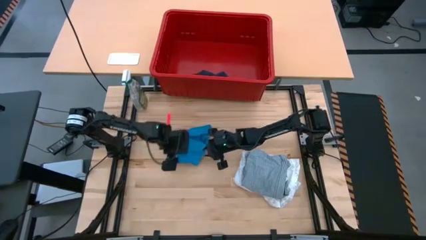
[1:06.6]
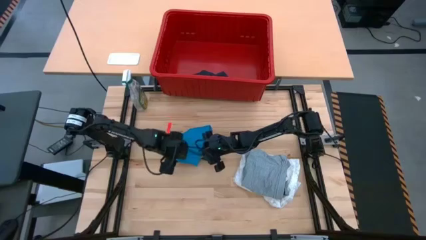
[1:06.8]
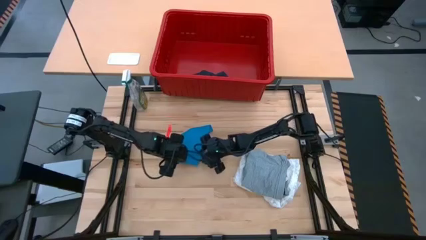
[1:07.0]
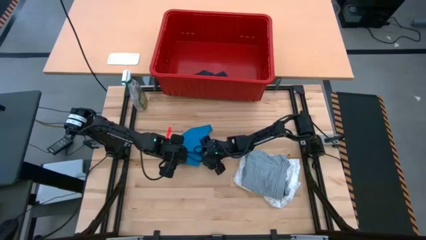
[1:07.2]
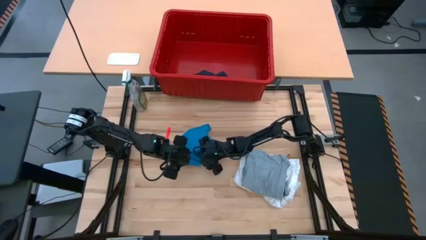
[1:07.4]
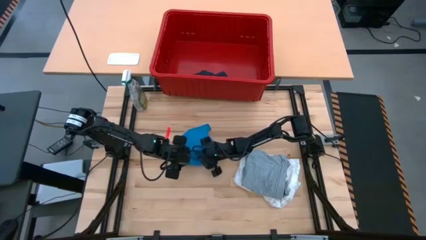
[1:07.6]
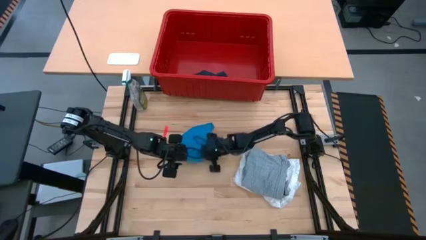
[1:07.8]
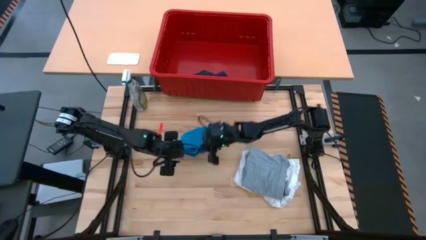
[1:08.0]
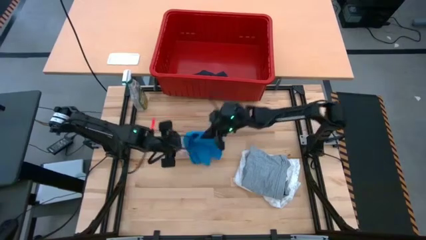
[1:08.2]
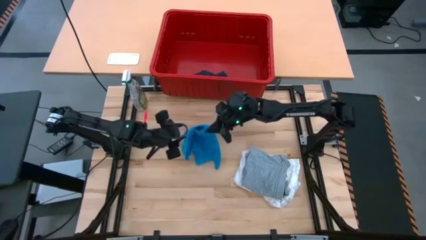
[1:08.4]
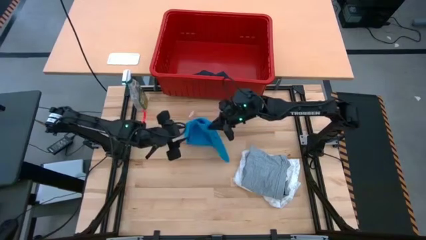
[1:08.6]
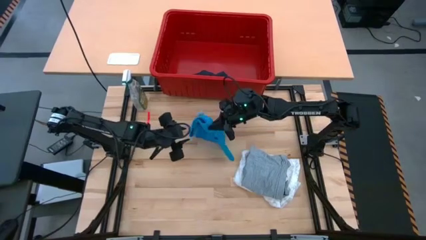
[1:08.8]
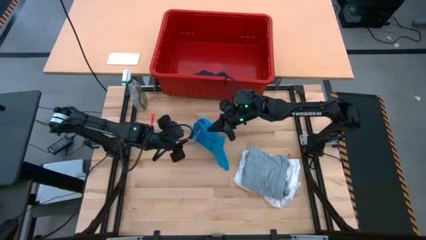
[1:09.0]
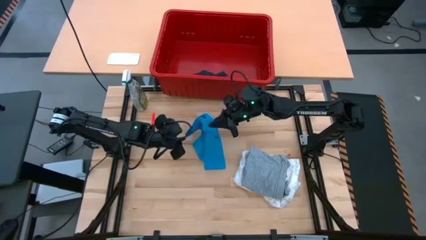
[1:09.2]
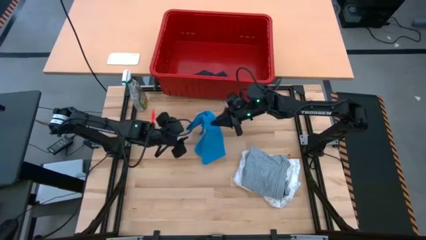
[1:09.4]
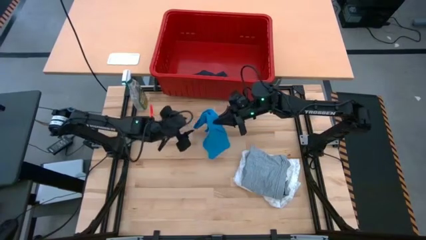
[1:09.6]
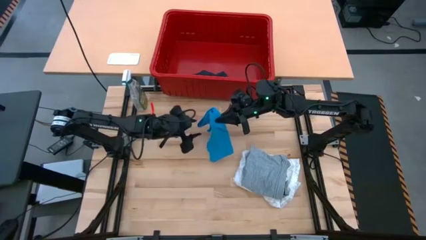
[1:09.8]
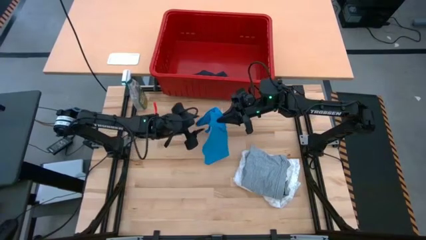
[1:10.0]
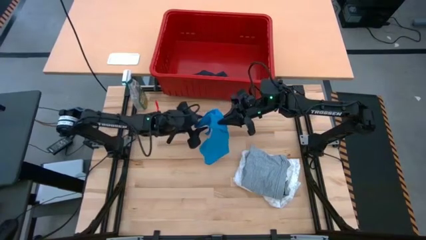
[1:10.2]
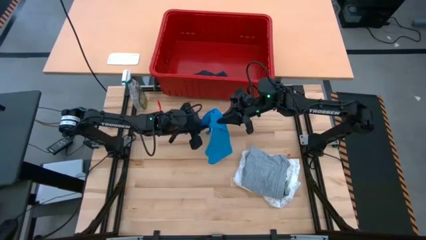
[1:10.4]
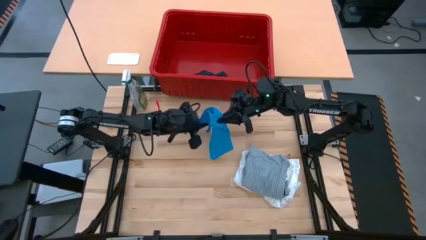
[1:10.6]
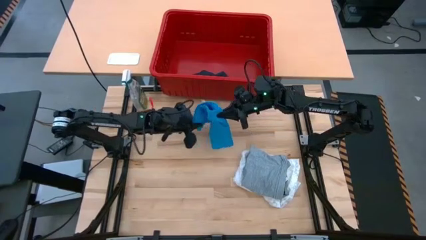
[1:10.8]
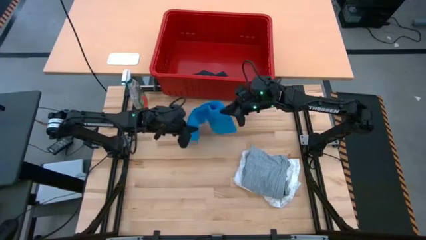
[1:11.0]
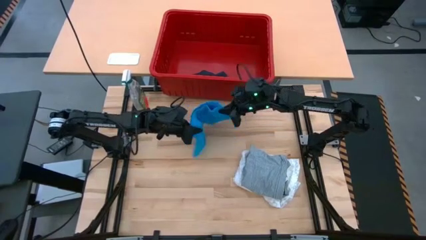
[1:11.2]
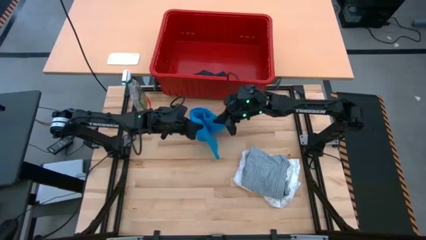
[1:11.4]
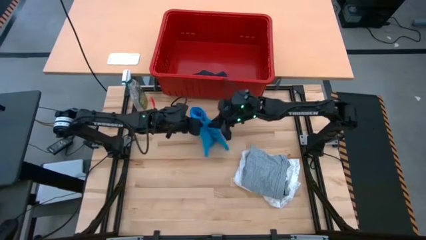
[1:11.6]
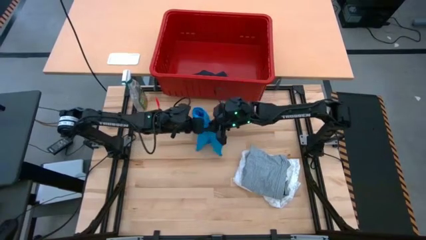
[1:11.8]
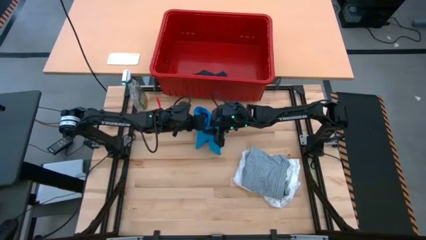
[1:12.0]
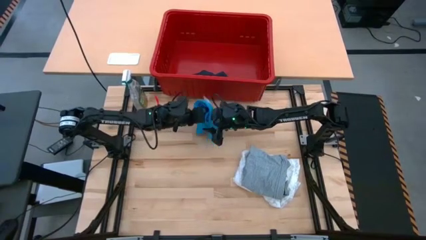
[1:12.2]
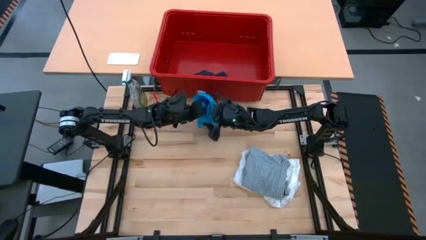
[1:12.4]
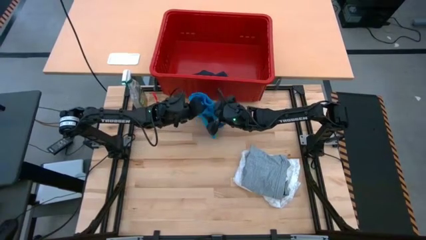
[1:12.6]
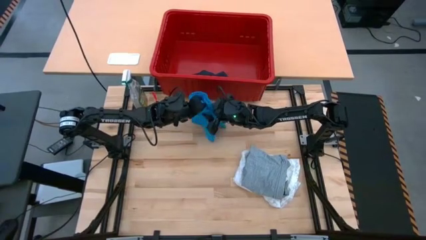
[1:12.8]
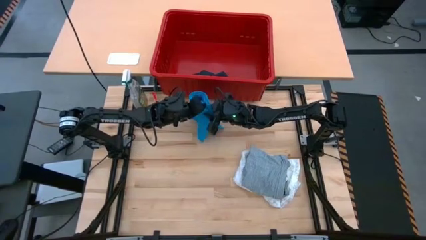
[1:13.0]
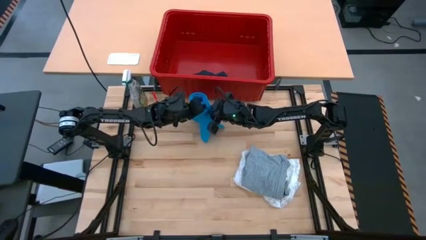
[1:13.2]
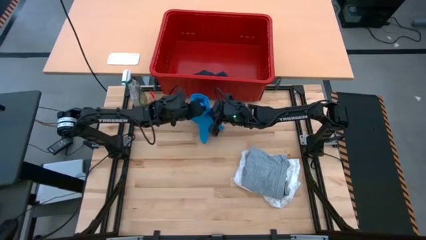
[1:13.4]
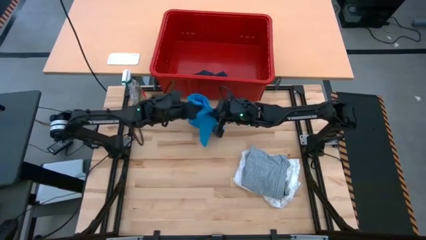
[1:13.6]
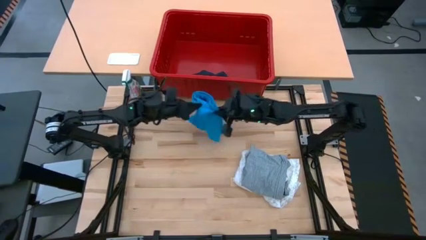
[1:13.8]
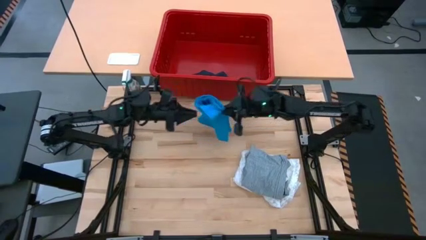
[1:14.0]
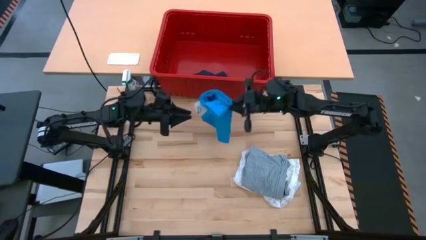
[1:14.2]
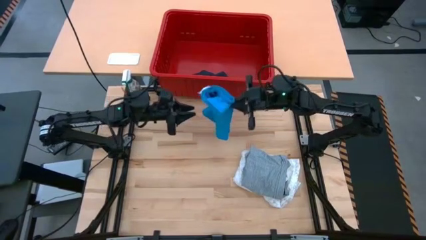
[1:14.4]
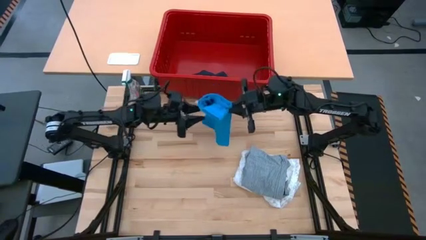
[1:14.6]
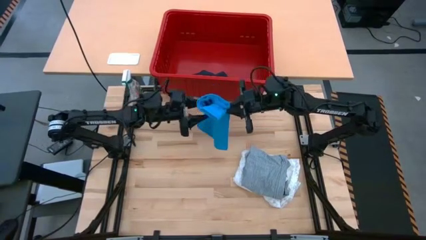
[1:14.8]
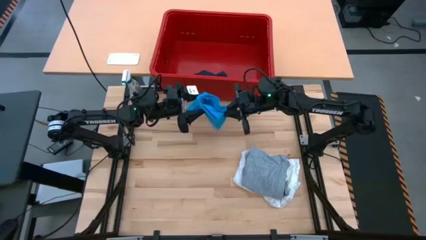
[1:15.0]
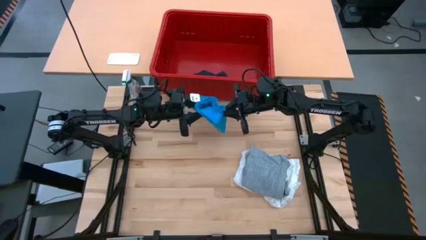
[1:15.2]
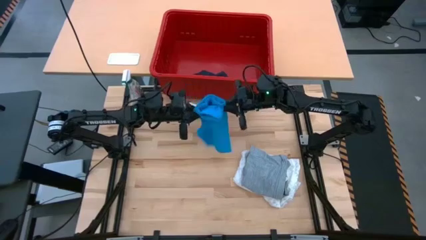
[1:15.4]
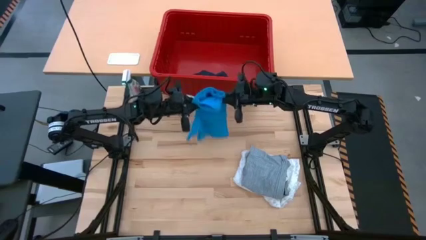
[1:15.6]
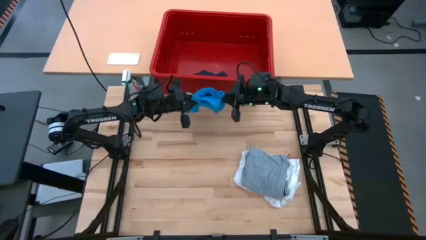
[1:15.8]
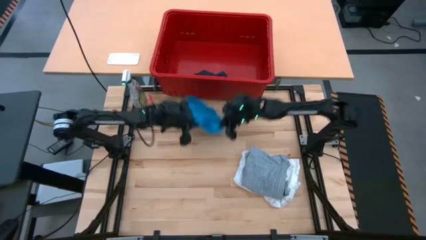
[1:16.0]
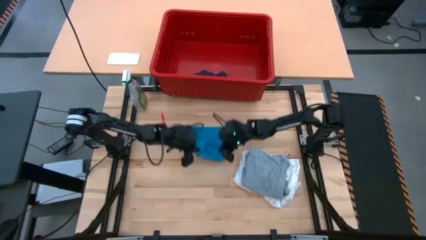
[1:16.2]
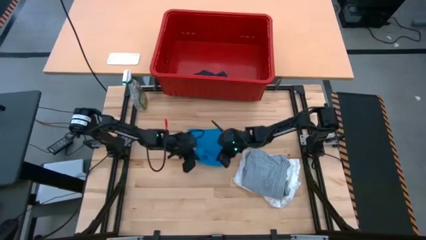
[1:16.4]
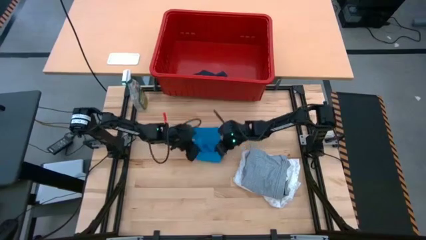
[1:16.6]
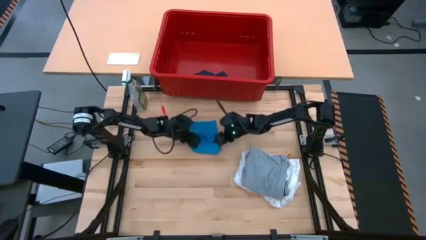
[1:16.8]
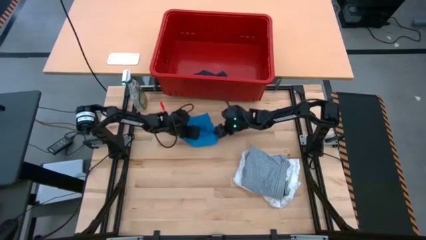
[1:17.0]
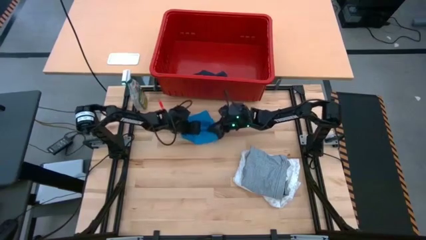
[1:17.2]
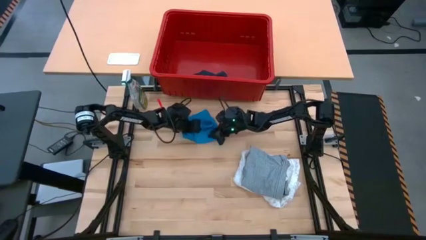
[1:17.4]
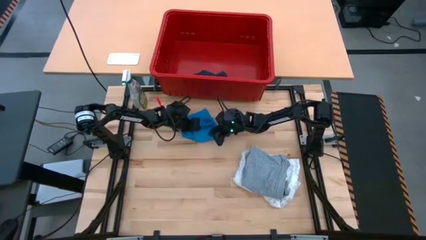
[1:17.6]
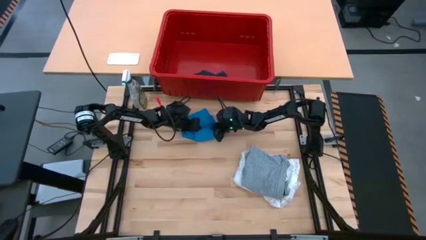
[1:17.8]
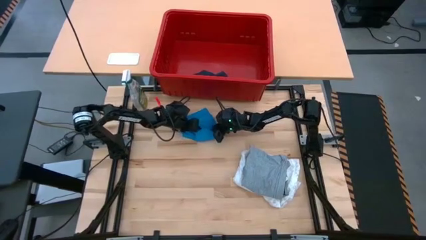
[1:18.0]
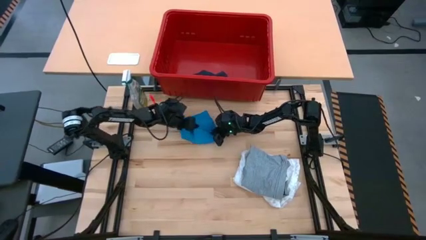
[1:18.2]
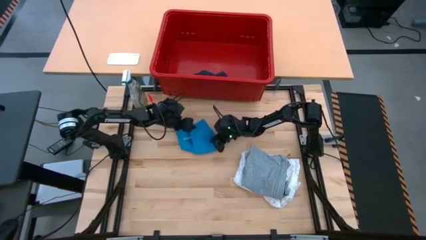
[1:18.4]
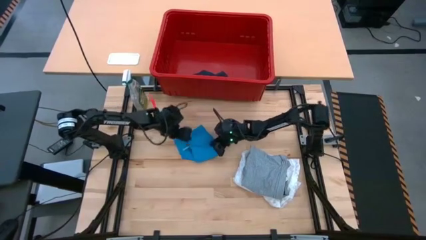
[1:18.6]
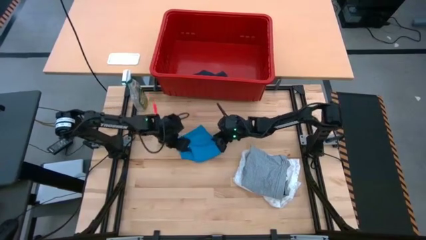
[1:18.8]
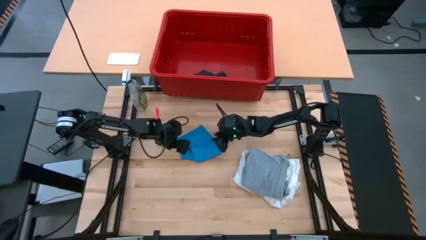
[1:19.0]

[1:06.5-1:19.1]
Task: Fold laundry
Fold the light blue short on the table

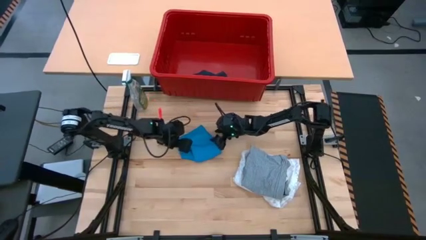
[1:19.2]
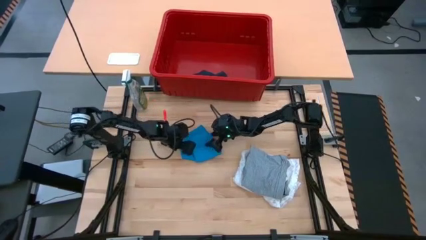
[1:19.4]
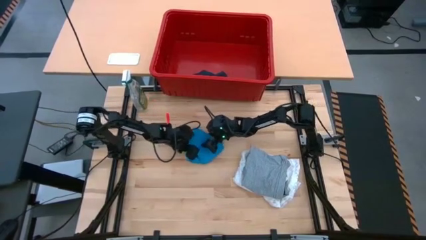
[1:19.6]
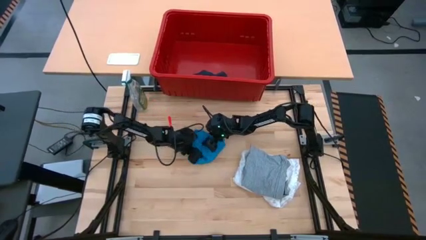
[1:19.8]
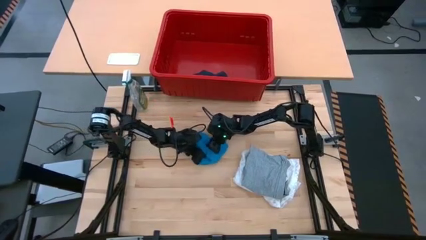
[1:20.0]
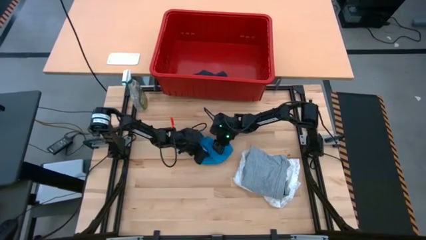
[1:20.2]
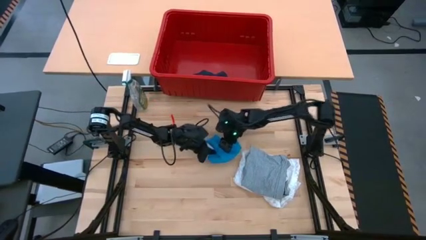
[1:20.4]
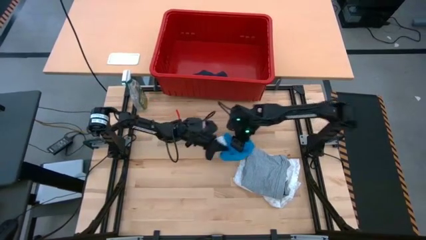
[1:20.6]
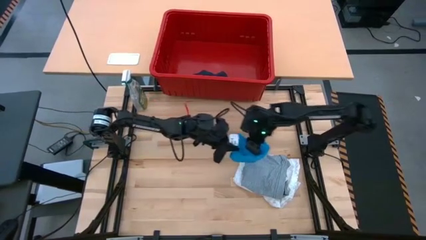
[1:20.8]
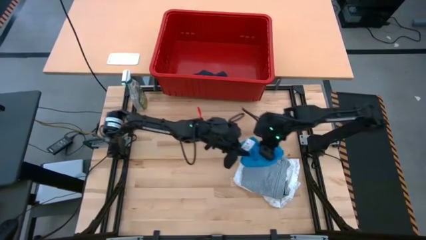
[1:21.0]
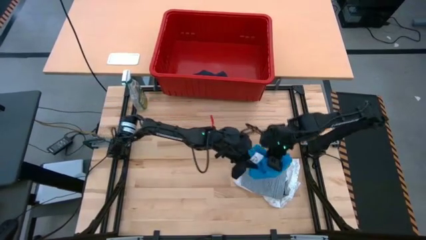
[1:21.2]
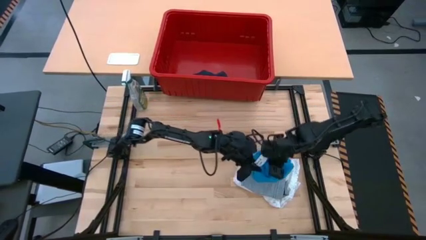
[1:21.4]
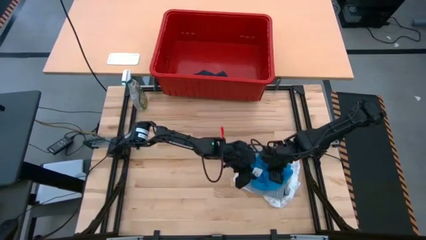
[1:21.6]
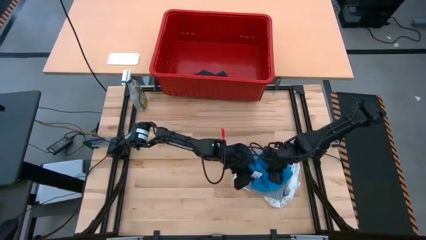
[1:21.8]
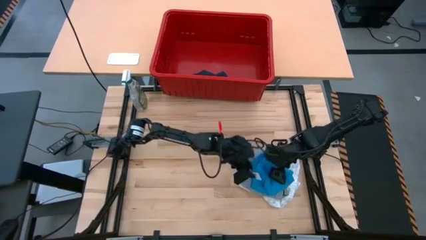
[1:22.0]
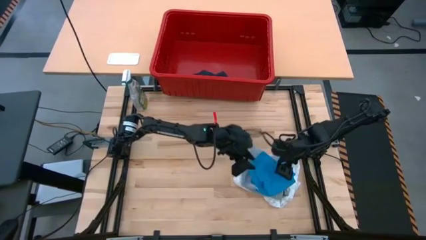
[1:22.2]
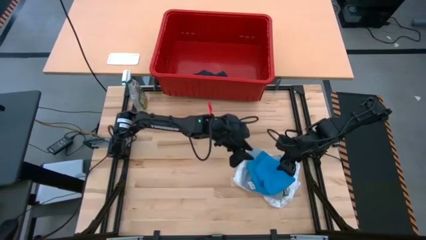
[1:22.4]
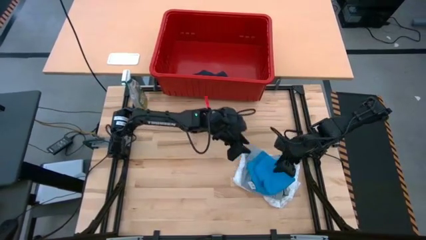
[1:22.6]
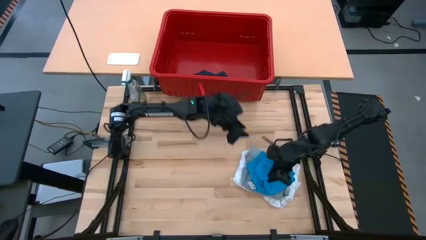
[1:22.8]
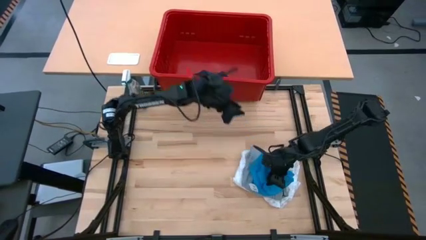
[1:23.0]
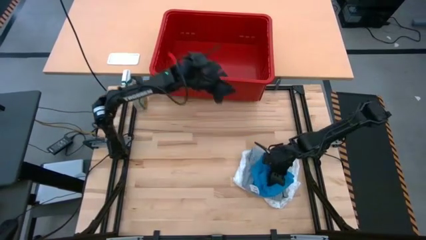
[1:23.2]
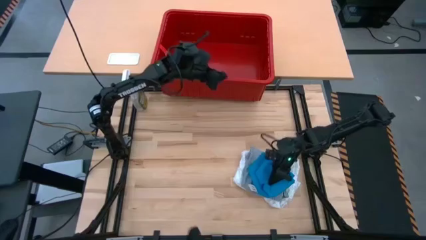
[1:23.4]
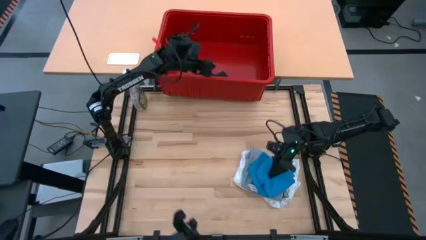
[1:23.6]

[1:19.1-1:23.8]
Stack the light blue shorts on top of the gray shirt
